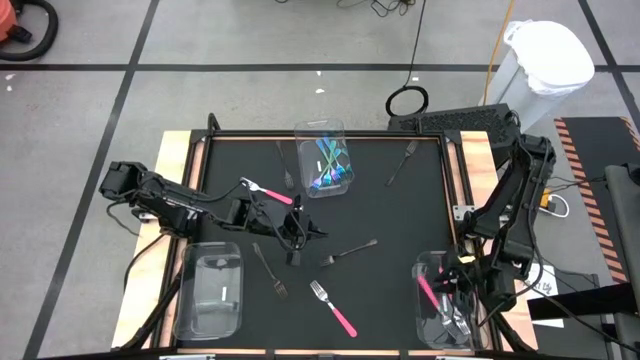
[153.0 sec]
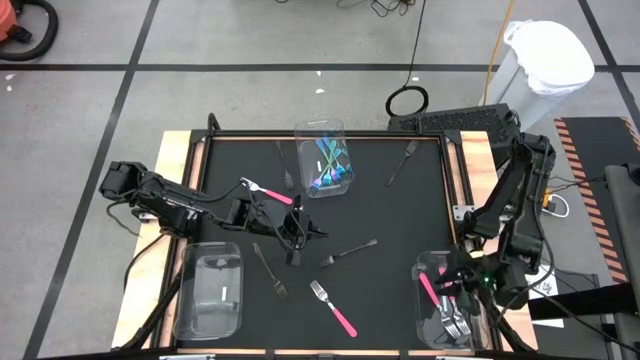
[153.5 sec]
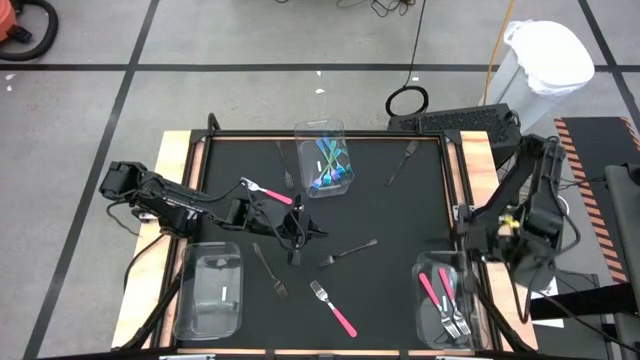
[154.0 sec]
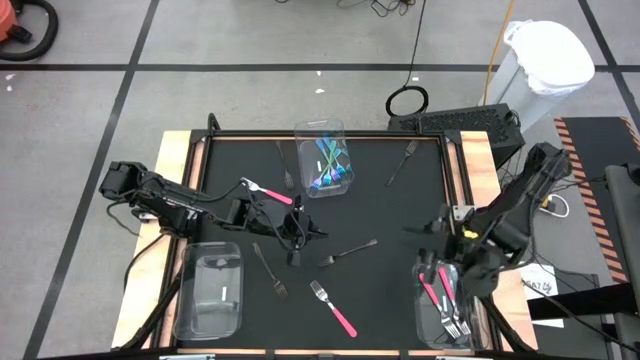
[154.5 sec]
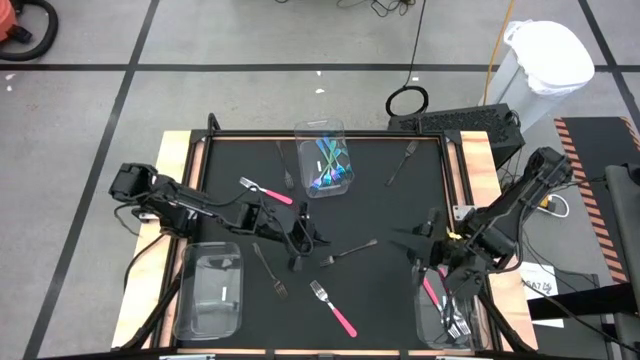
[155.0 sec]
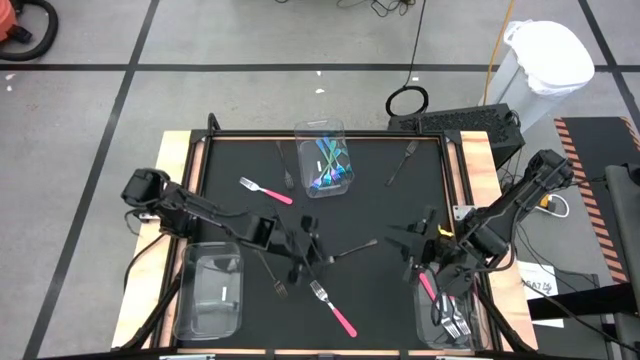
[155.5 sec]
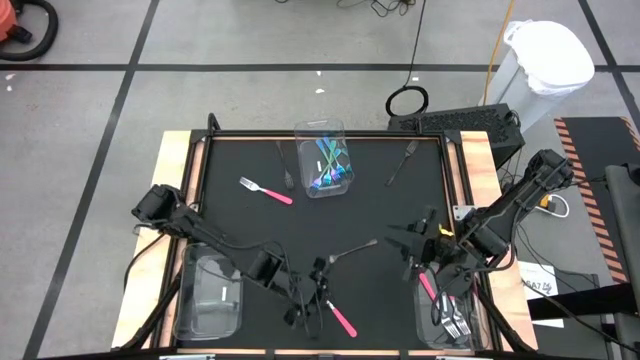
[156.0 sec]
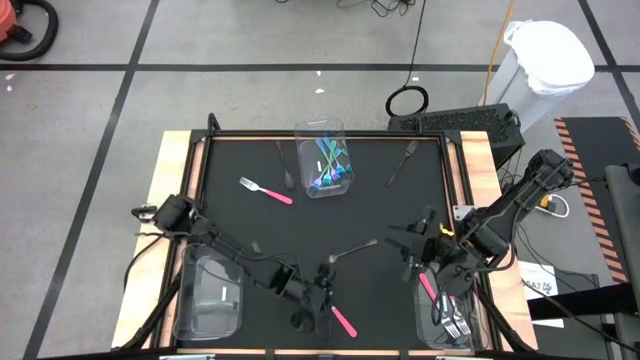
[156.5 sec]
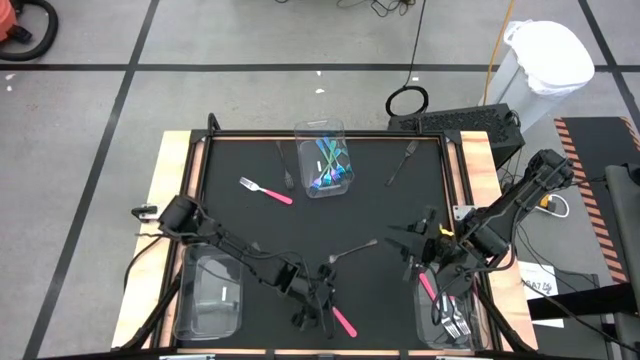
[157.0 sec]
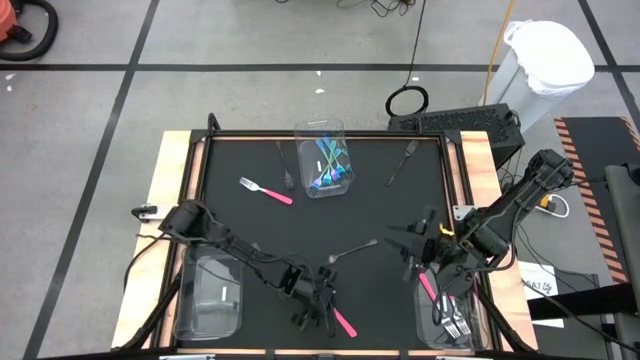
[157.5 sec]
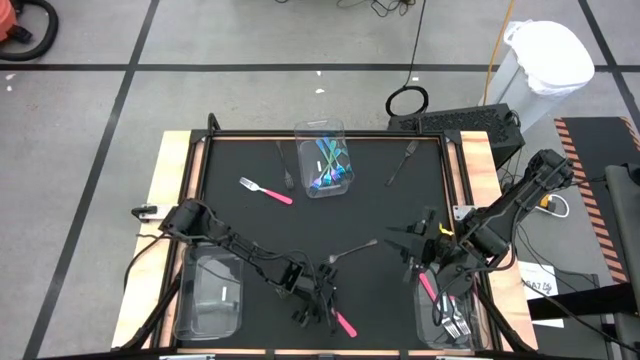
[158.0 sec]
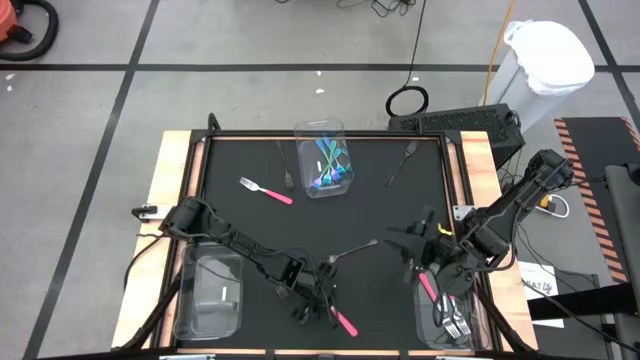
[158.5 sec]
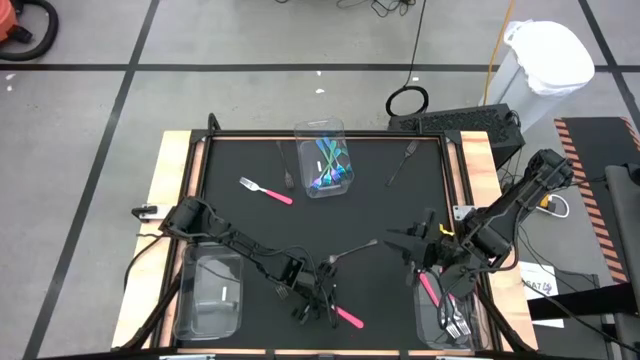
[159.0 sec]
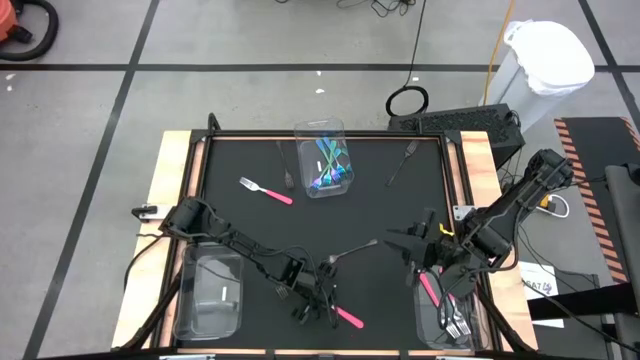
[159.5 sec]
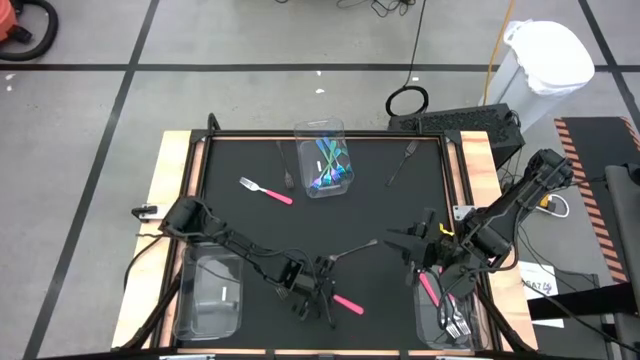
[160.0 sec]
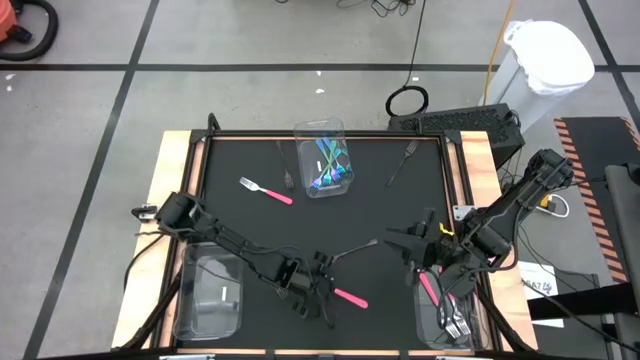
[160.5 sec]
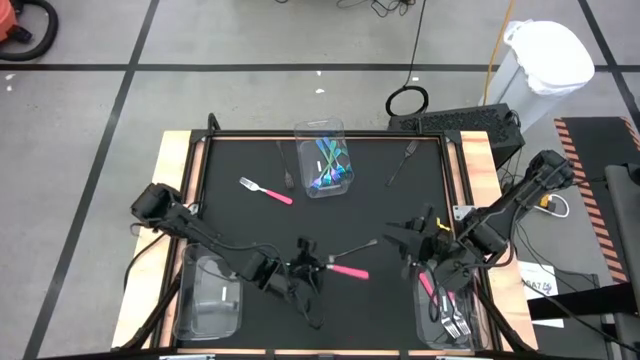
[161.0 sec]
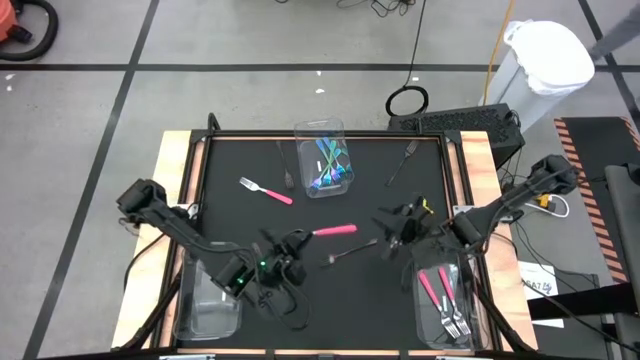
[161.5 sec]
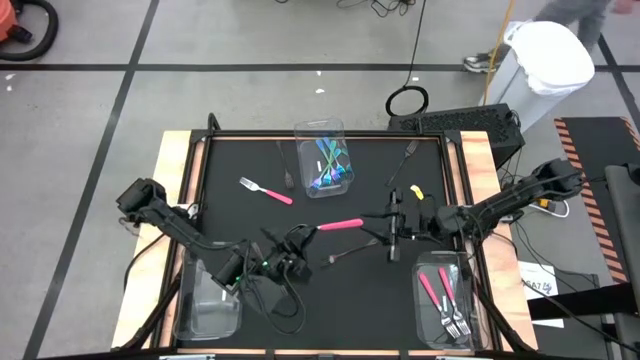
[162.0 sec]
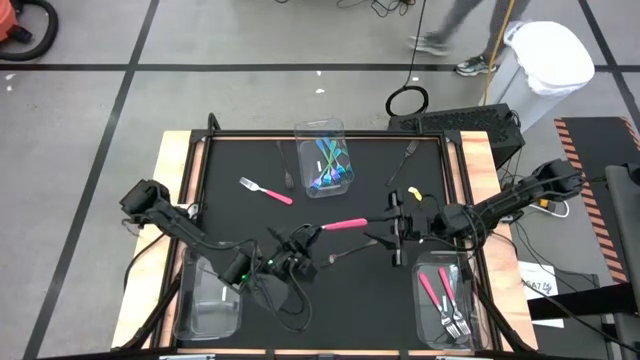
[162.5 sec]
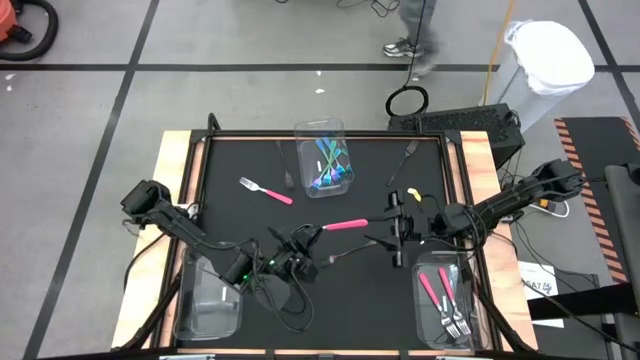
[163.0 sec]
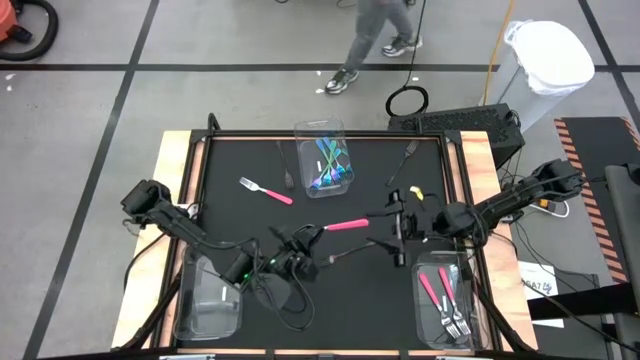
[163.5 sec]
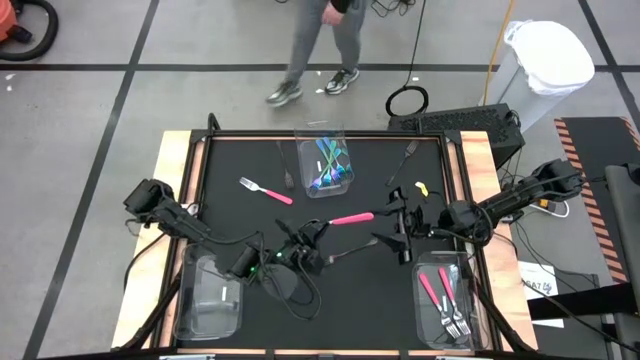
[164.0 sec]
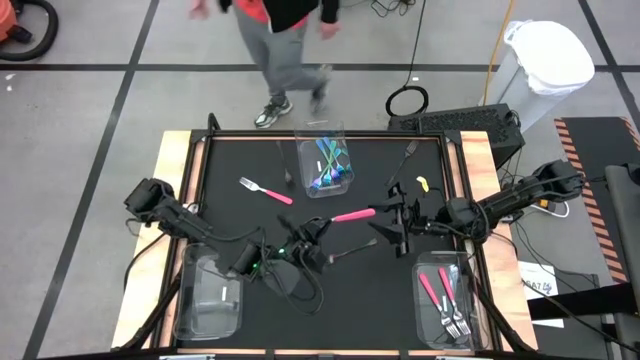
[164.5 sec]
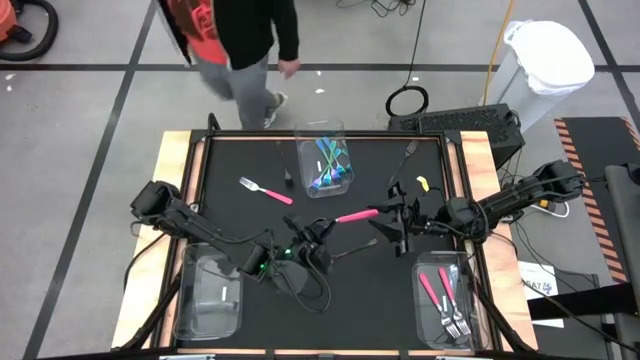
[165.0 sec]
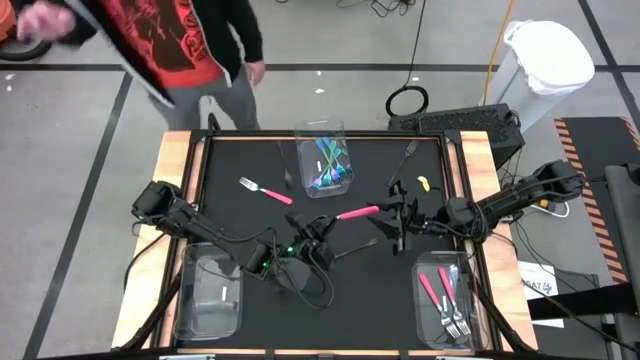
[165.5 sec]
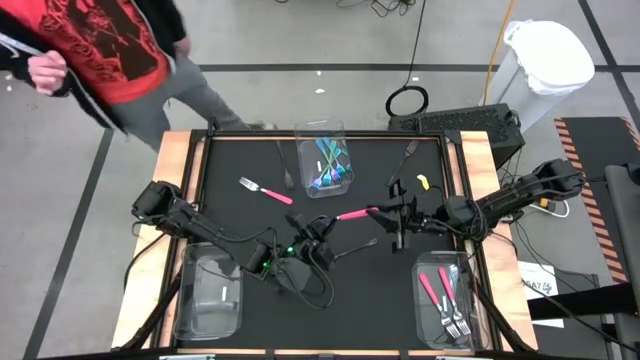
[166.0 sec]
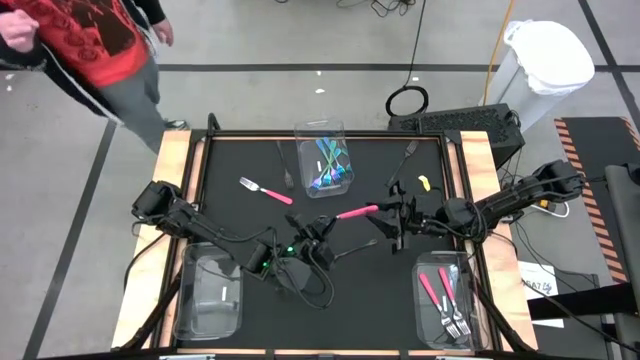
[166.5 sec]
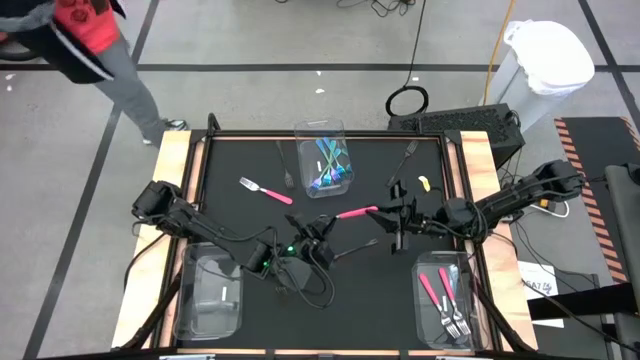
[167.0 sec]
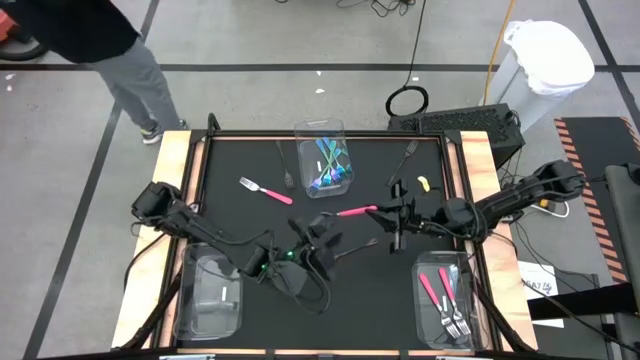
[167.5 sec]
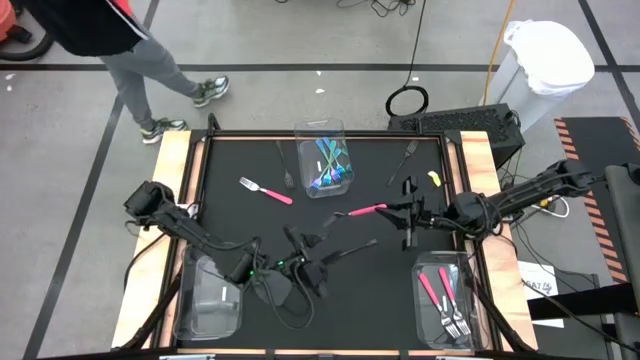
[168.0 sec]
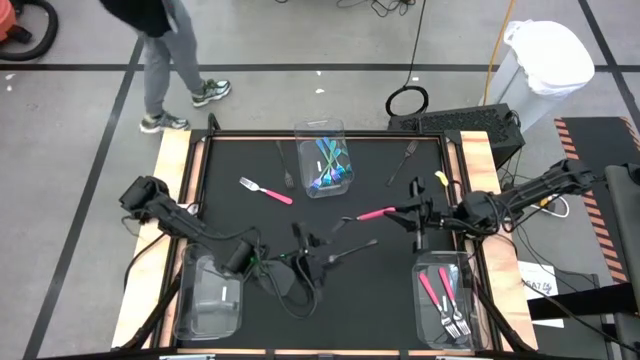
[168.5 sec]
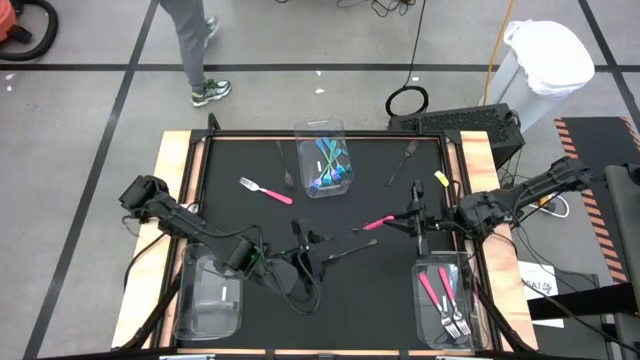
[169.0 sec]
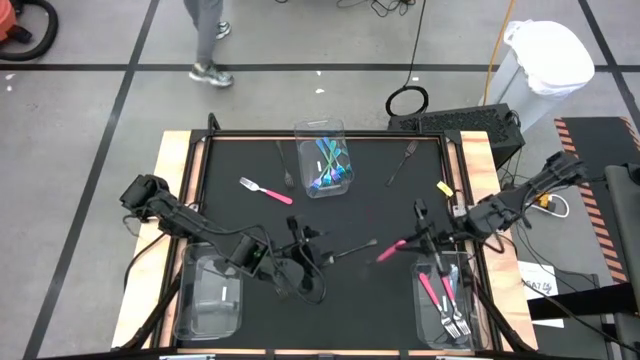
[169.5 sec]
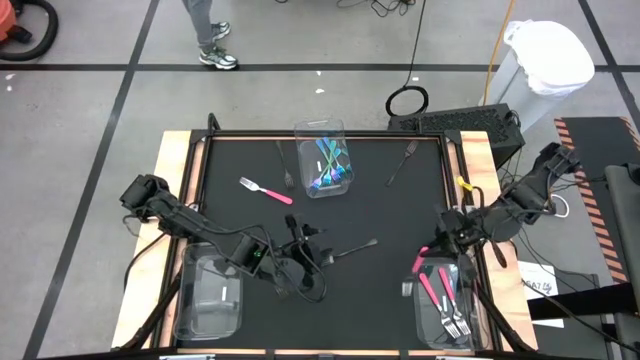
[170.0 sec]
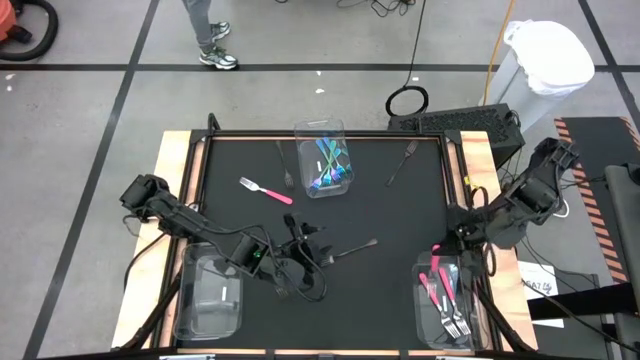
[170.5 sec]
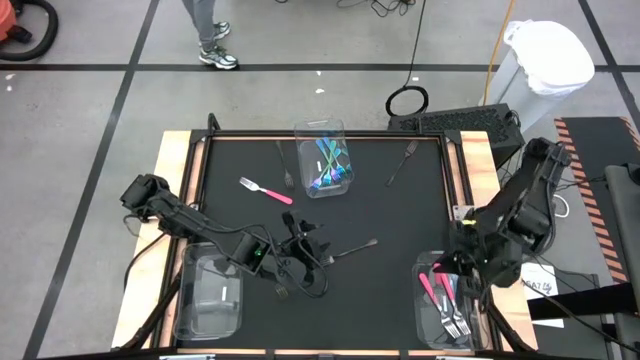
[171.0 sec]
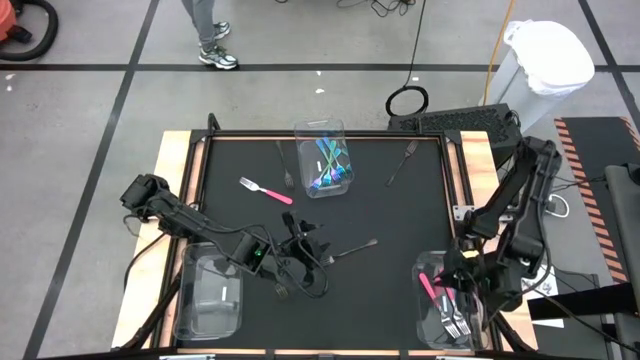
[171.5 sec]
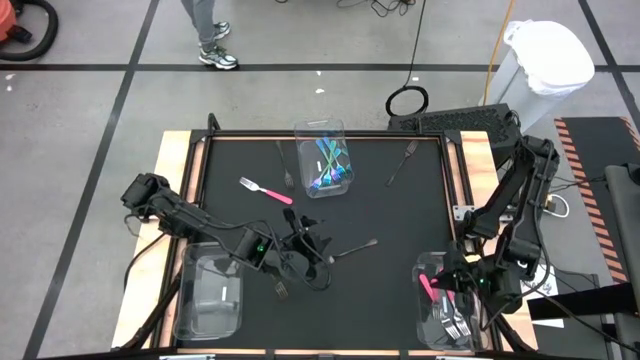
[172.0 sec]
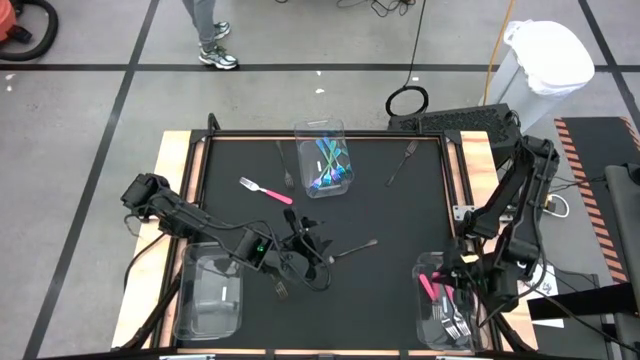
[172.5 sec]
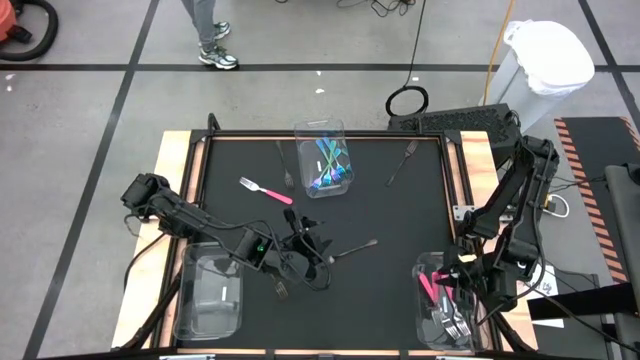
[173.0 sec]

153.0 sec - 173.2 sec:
Task: Sort silverware by color (type)
Put the pink fork into the bottom right transparent bin

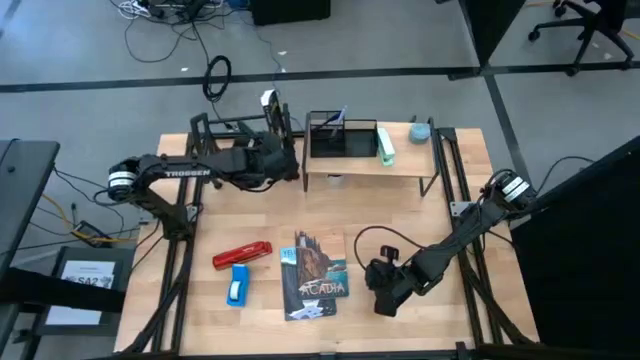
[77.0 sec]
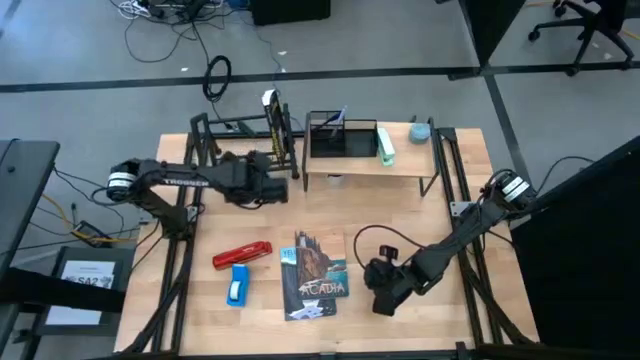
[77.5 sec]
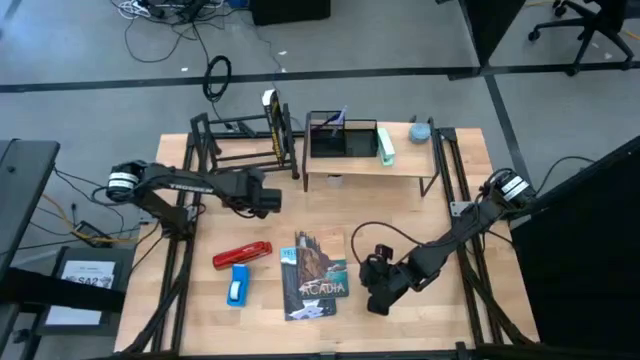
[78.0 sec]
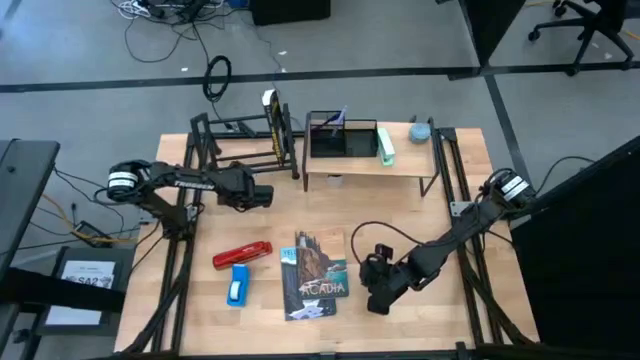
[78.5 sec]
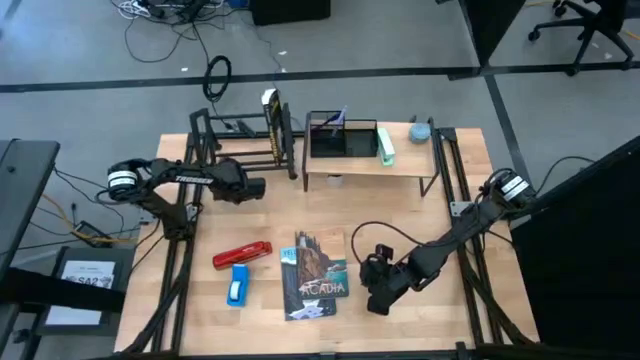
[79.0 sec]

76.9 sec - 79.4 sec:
Task: Stock shelves
Adjust the black bookshelf
